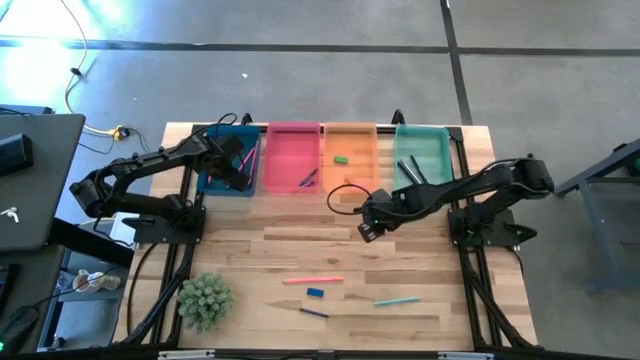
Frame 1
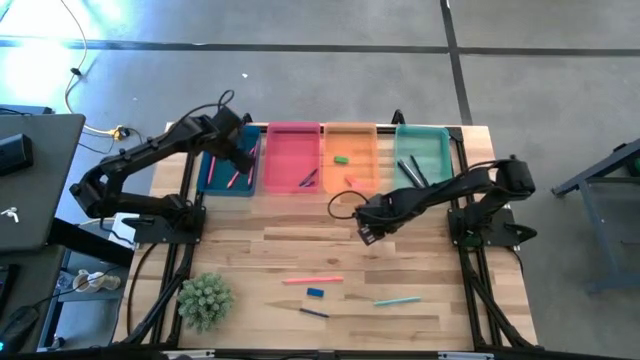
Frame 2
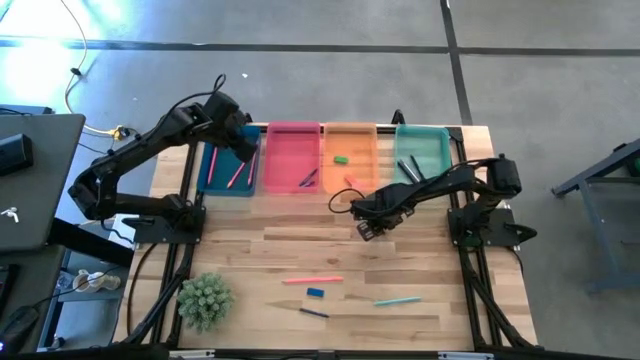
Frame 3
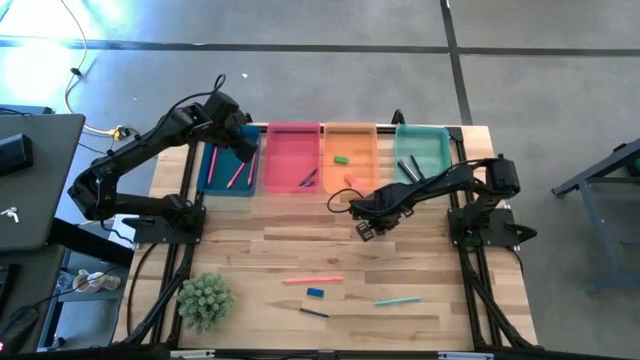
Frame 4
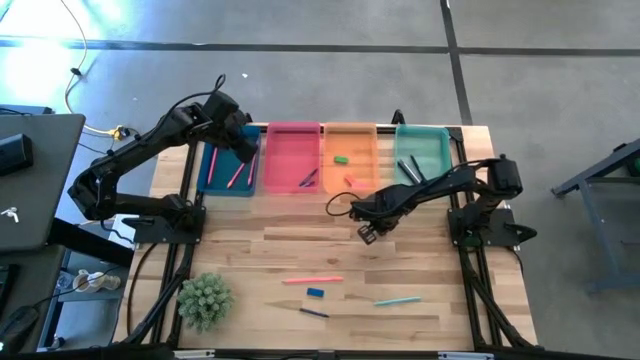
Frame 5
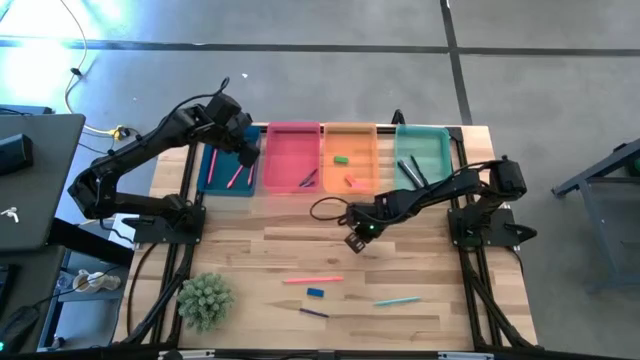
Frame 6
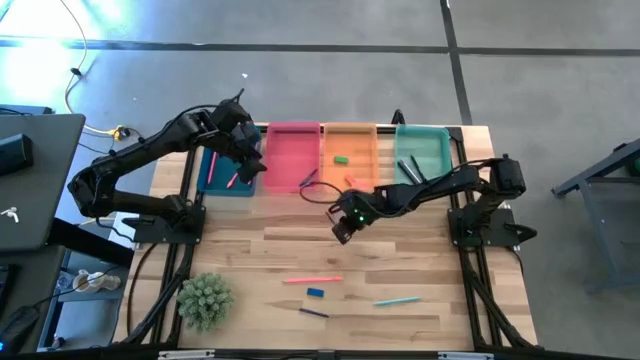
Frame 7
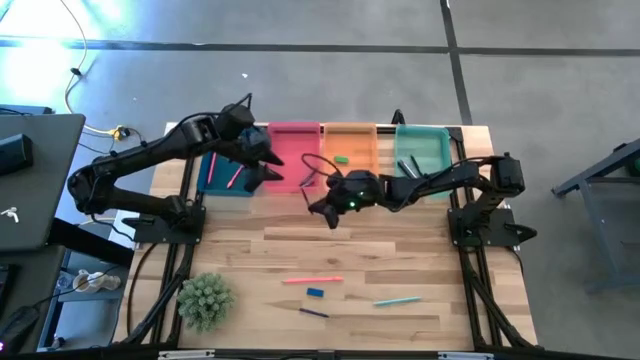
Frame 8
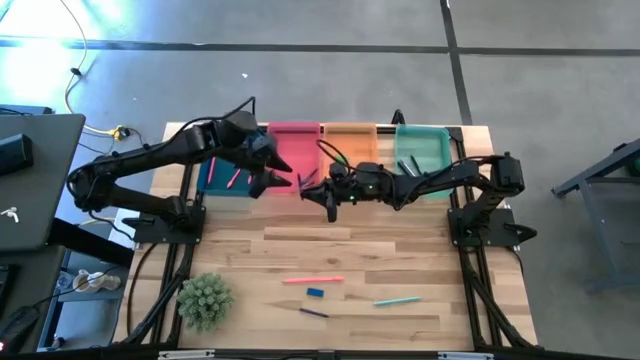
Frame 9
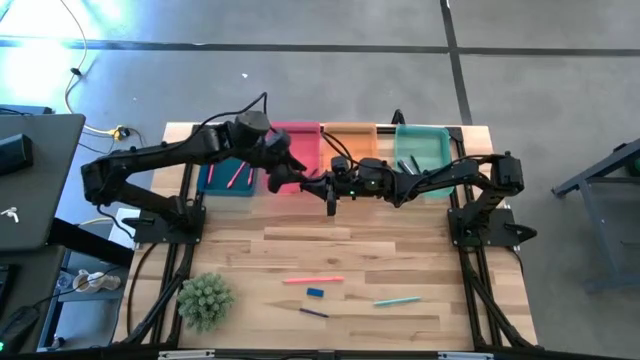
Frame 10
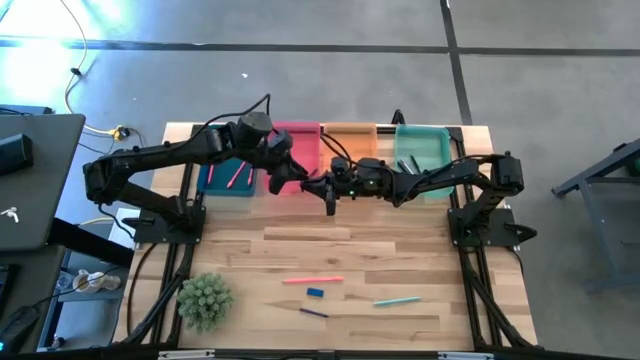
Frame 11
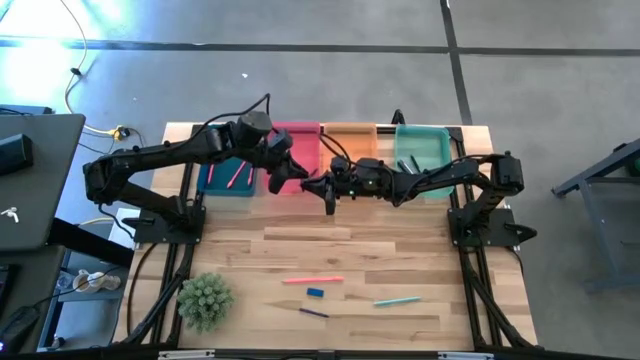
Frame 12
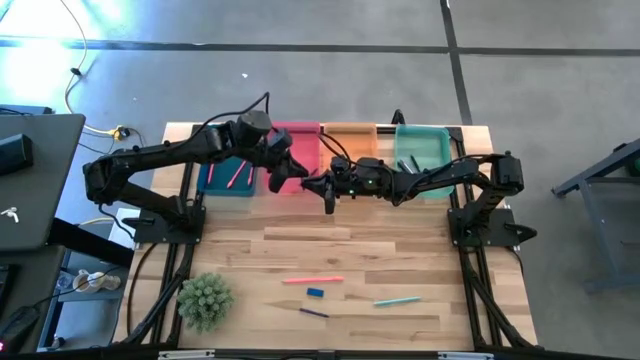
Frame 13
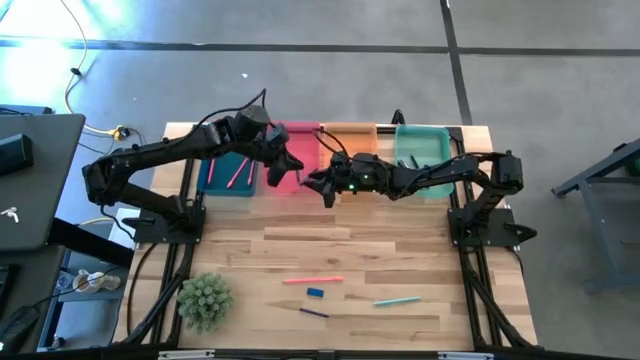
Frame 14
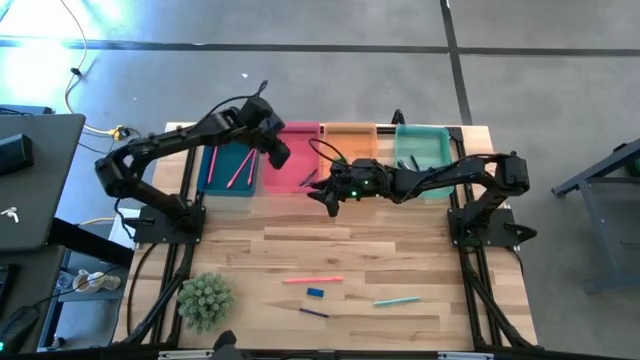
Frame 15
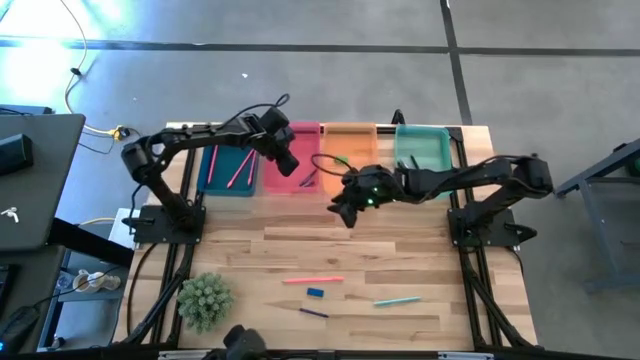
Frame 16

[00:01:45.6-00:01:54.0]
Task: Sort crayons/erasers/pens/pencils in bins
Put the top blue crayon into the pink bin

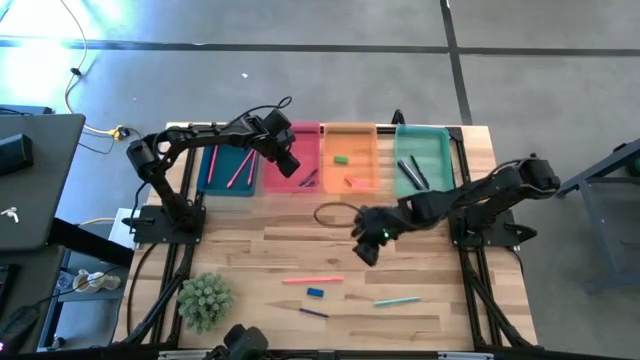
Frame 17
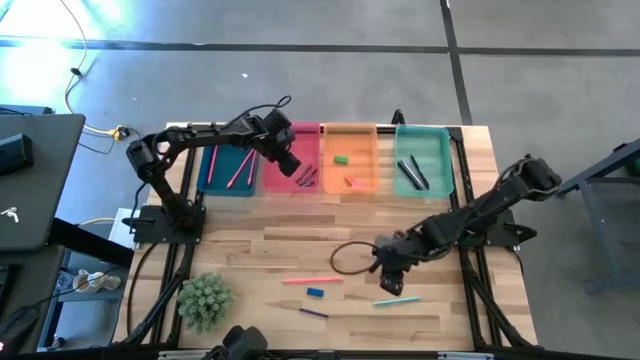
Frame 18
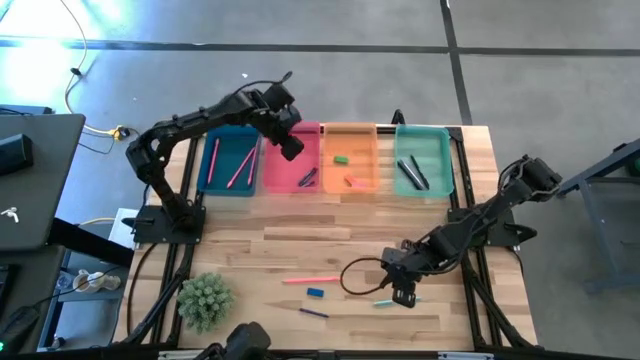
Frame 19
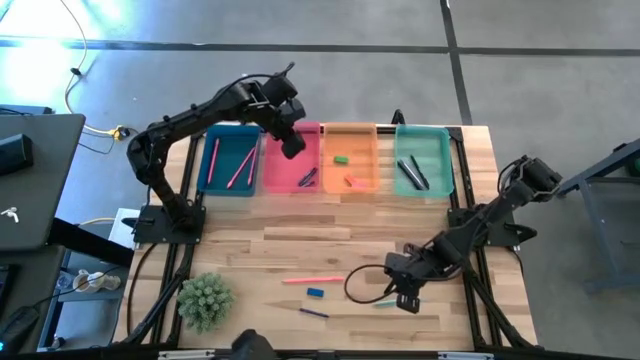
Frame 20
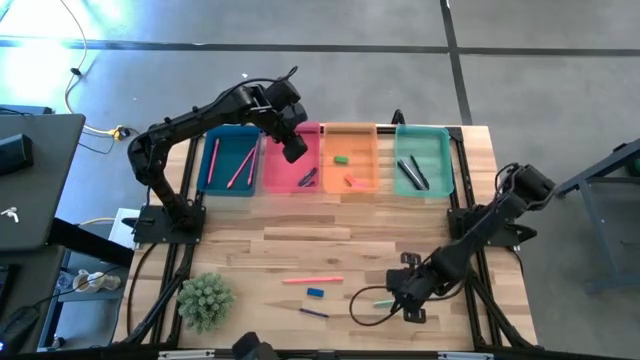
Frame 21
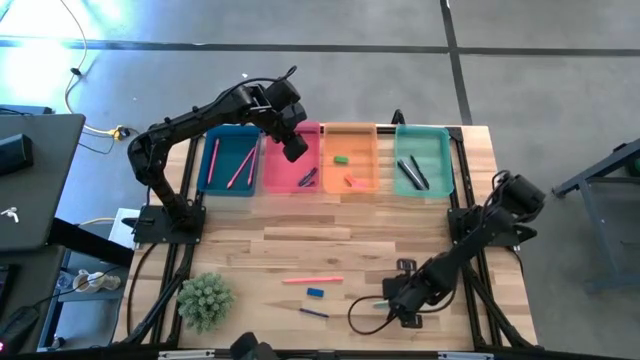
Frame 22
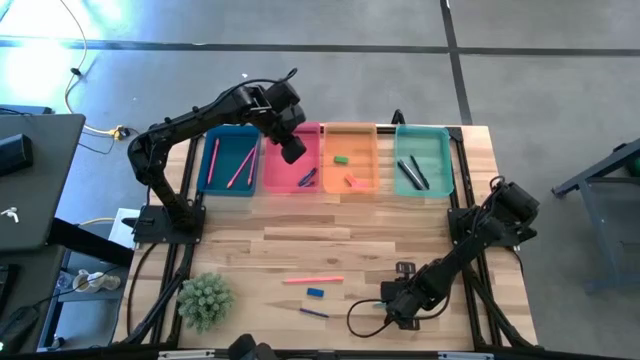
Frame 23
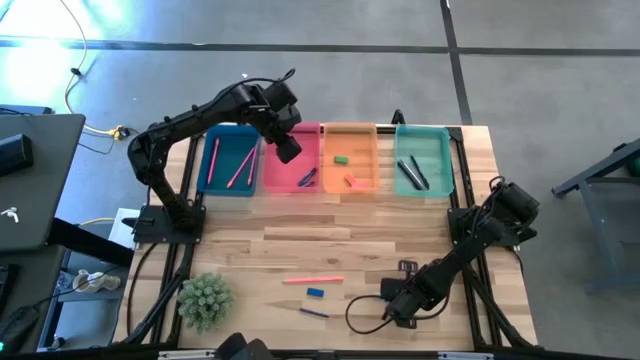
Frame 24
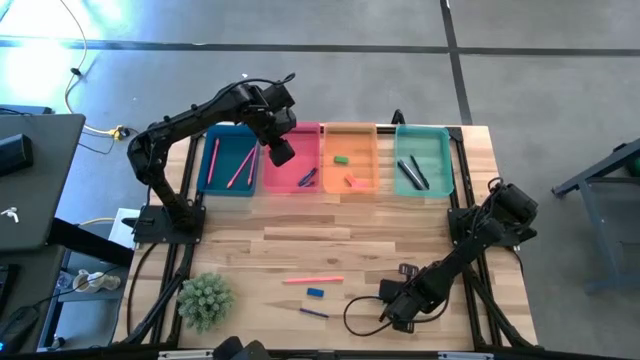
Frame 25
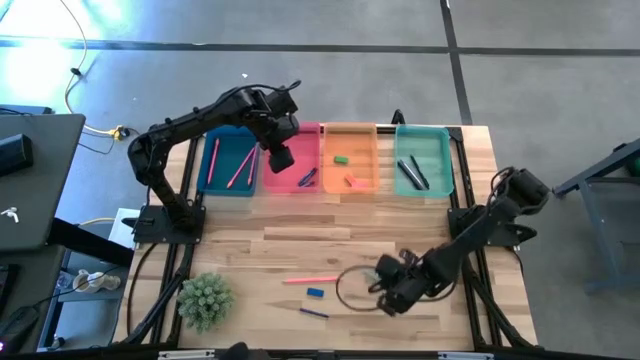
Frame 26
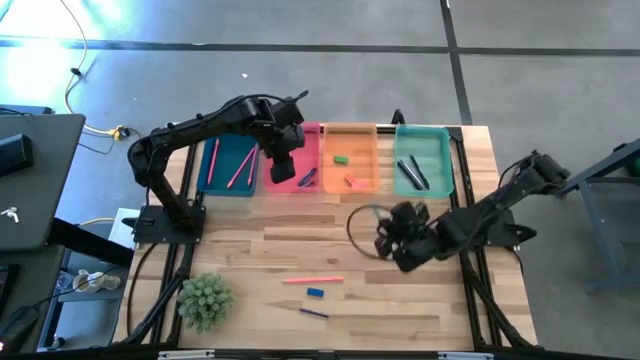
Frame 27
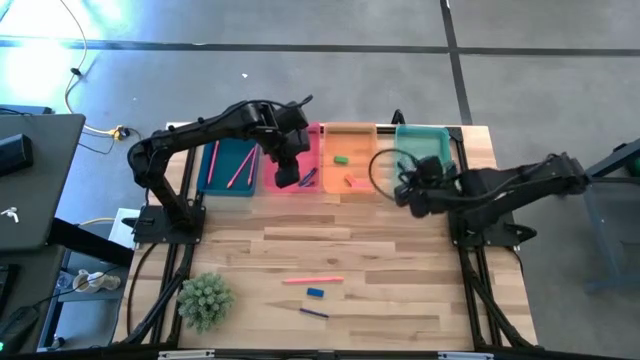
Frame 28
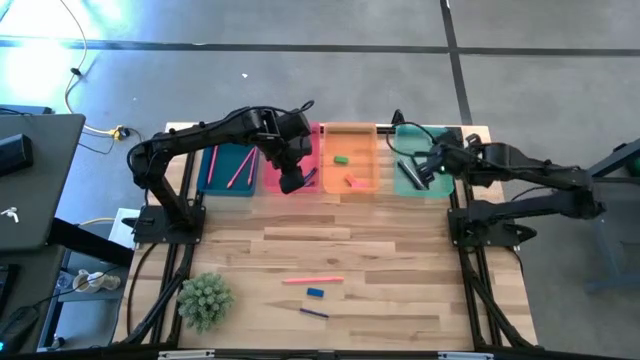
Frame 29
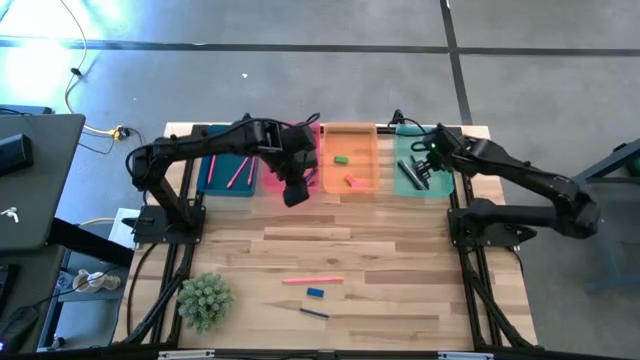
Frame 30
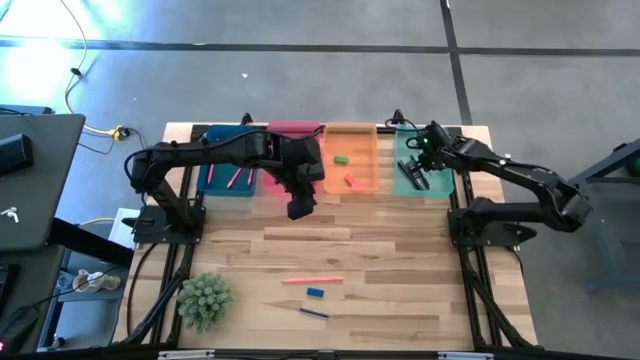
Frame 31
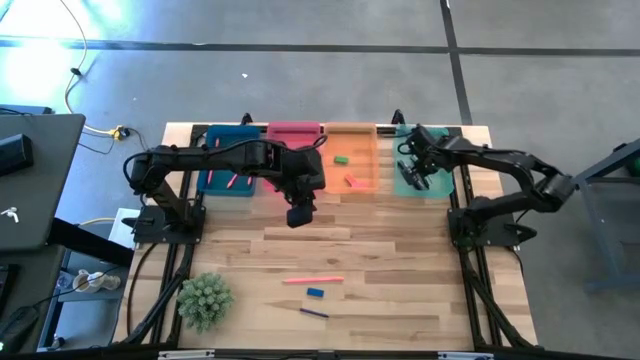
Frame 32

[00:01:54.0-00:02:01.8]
Put the light blue pen into the green bin

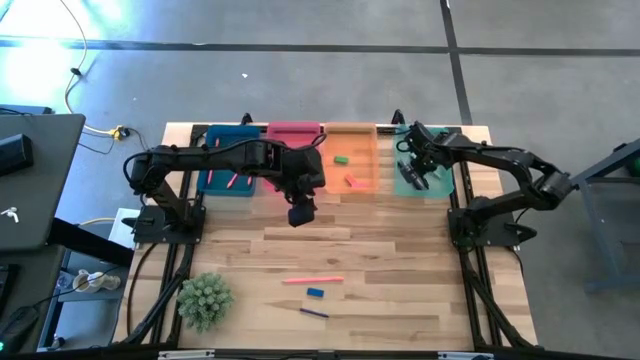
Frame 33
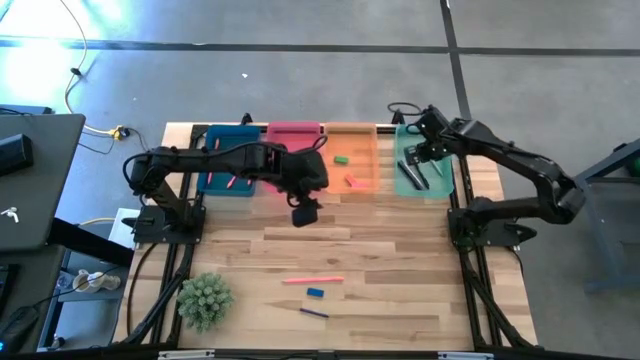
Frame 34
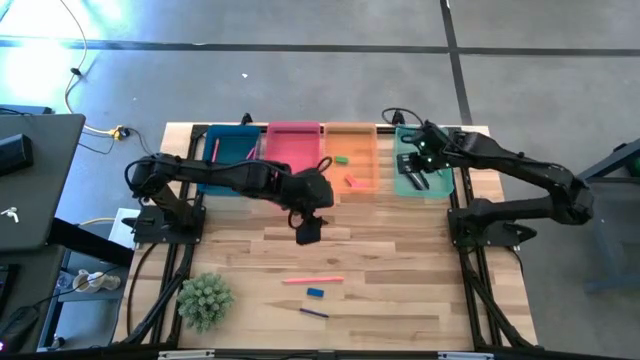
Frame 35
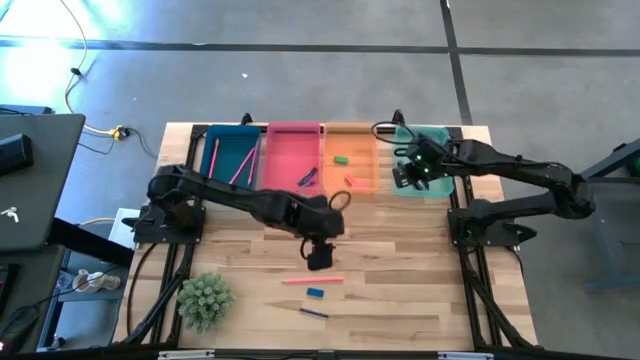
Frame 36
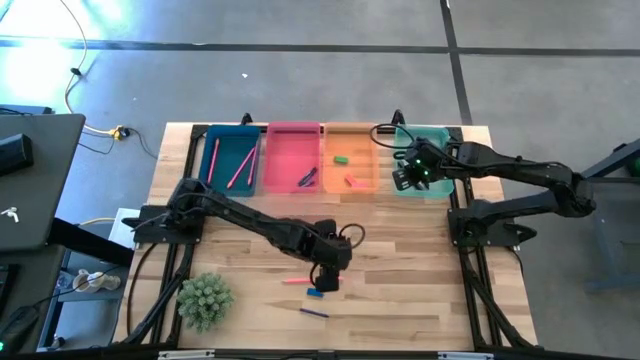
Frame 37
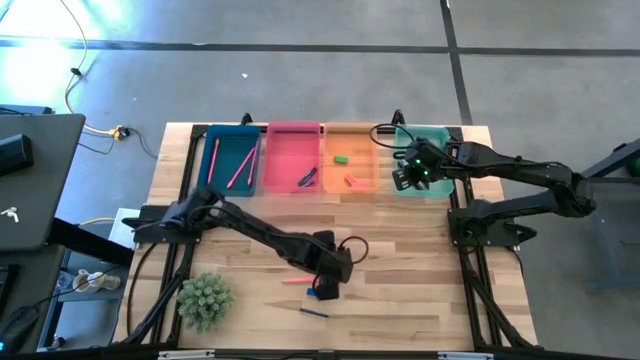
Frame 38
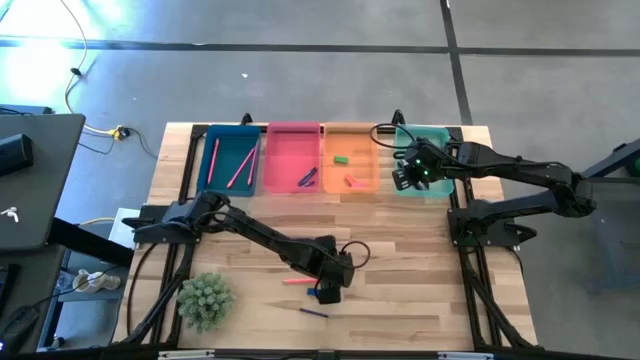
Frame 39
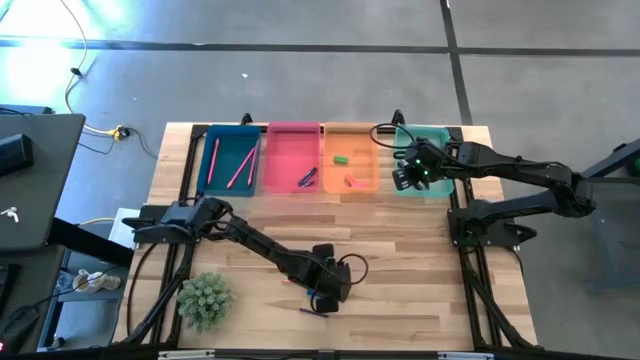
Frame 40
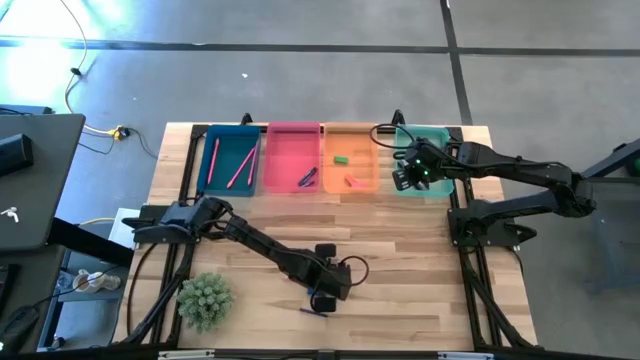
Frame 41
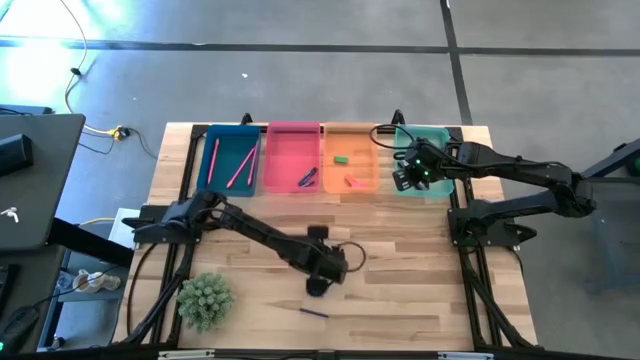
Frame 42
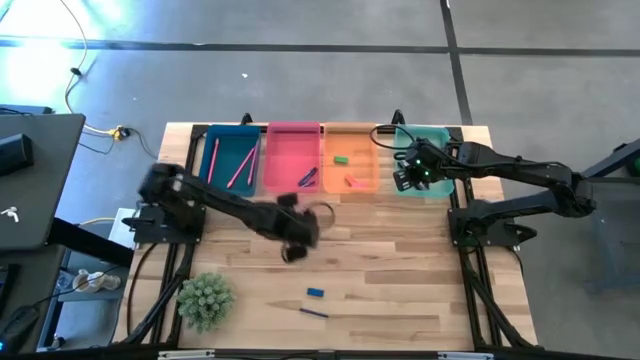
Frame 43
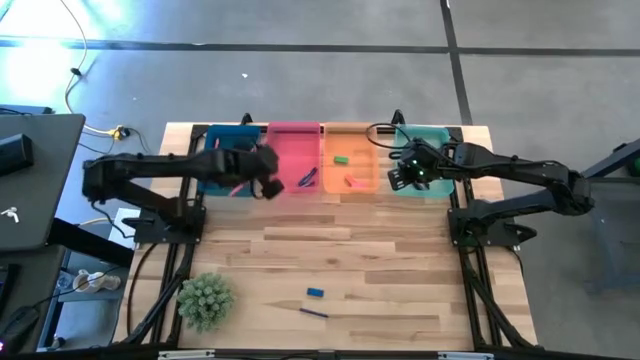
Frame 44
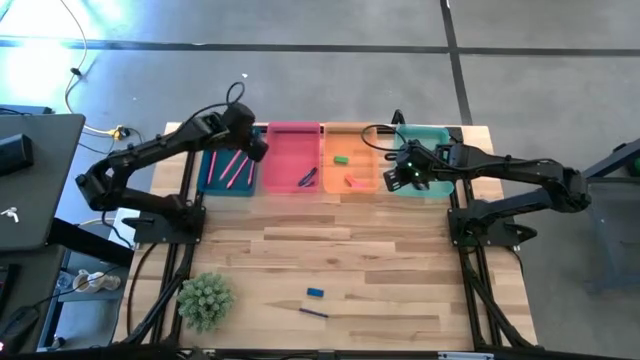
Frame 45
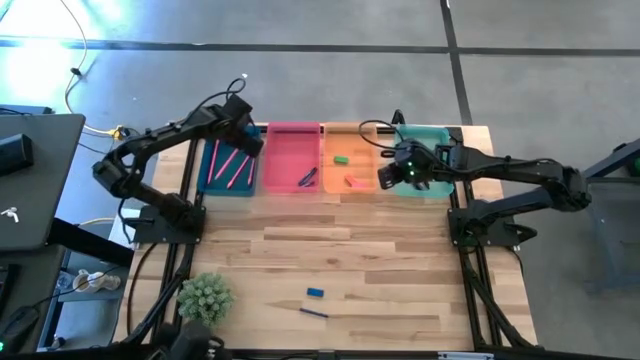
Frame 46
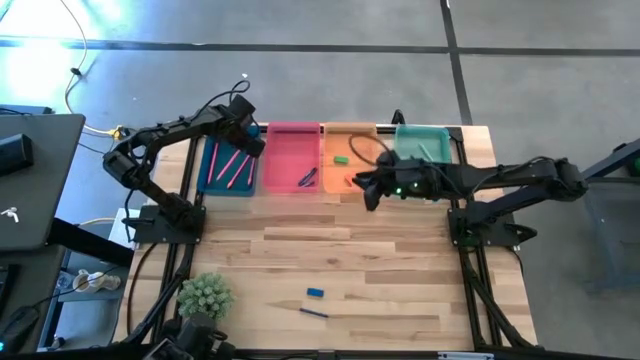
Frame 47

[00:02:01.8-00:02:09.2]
Put the pink pencil into the blue bin
